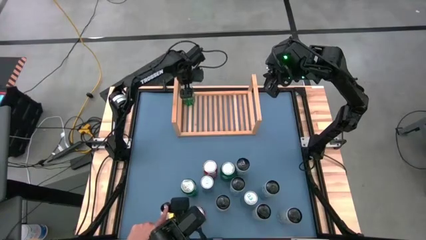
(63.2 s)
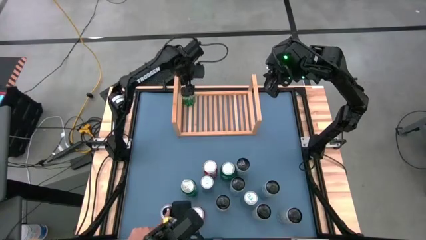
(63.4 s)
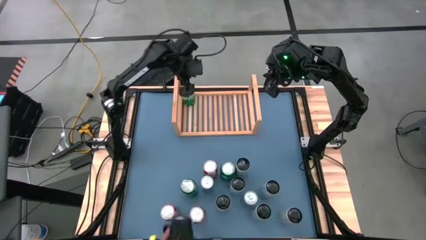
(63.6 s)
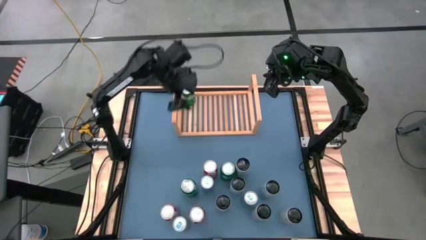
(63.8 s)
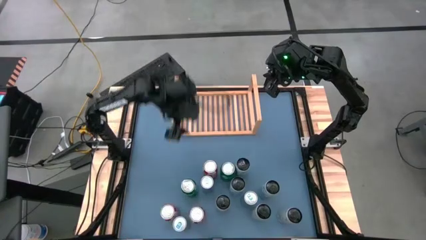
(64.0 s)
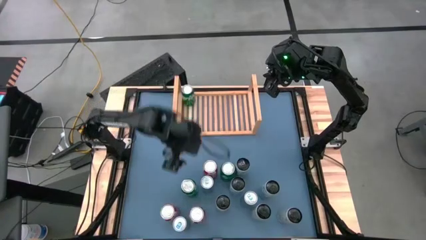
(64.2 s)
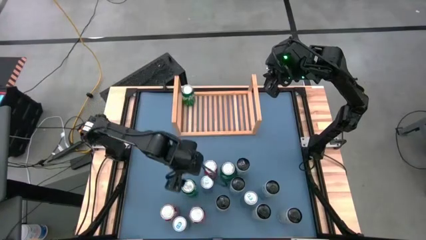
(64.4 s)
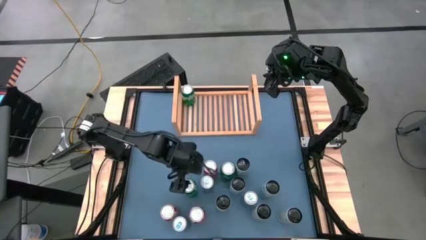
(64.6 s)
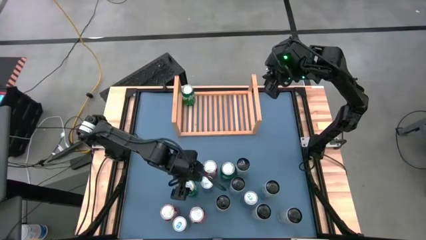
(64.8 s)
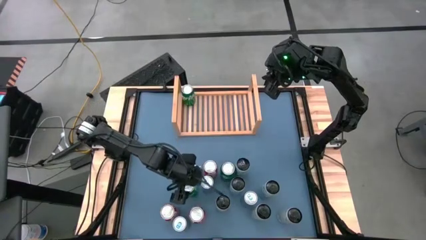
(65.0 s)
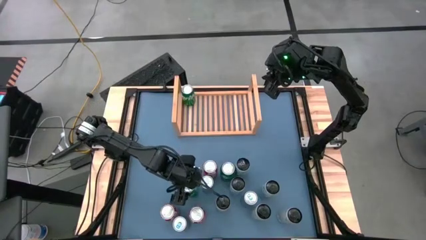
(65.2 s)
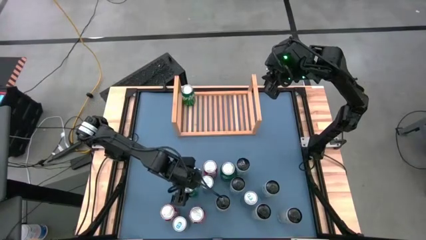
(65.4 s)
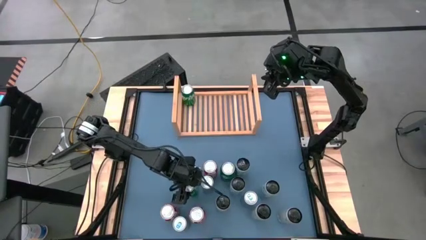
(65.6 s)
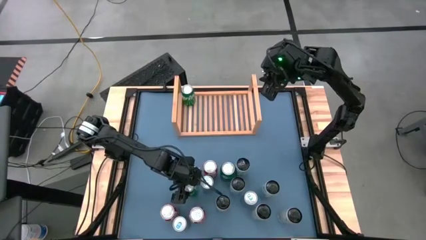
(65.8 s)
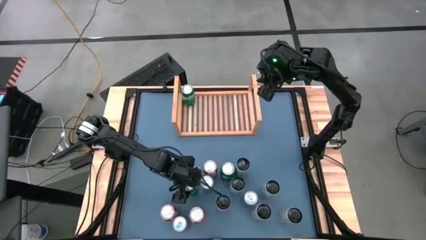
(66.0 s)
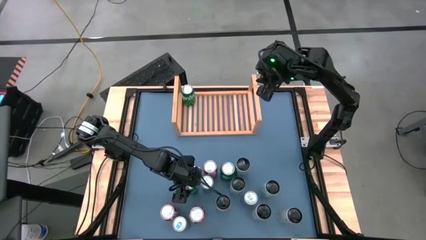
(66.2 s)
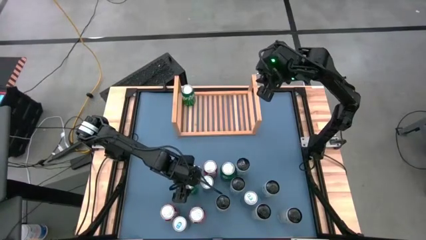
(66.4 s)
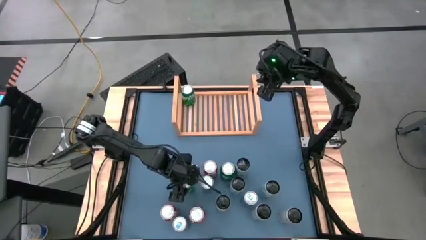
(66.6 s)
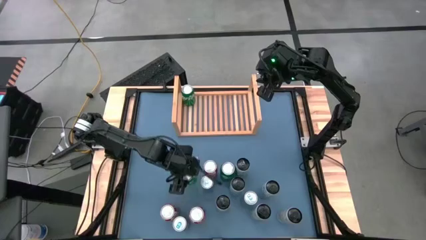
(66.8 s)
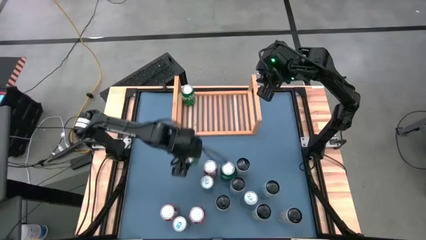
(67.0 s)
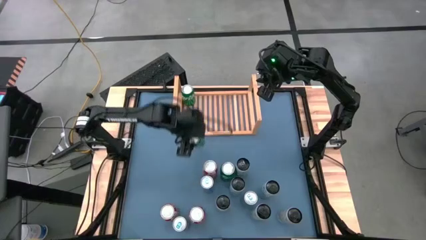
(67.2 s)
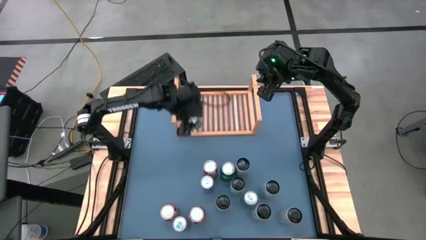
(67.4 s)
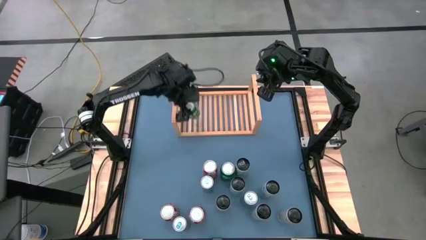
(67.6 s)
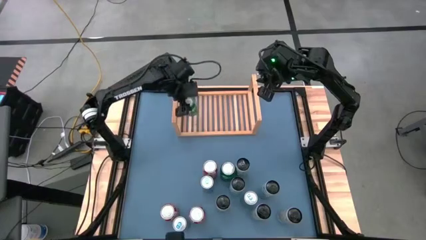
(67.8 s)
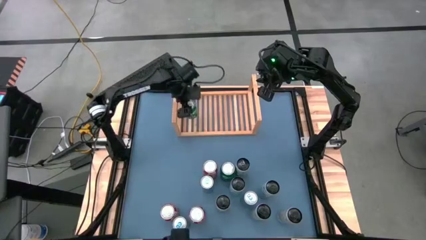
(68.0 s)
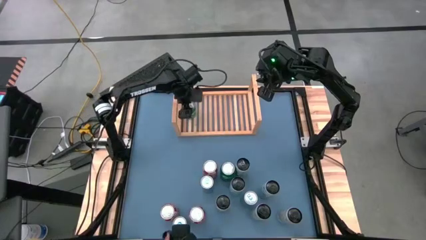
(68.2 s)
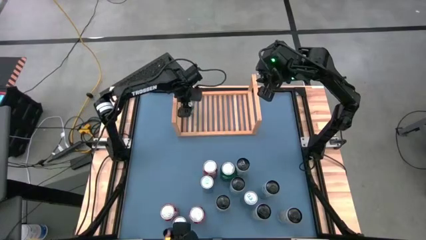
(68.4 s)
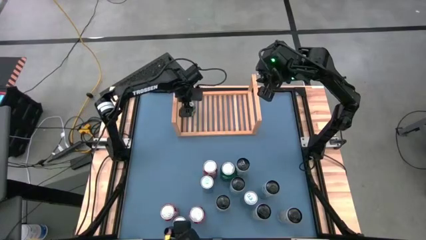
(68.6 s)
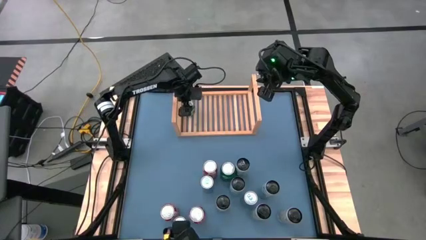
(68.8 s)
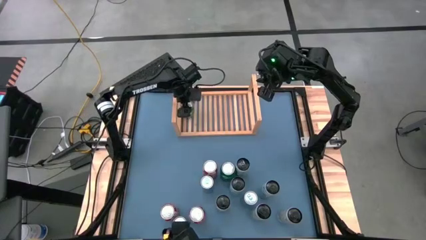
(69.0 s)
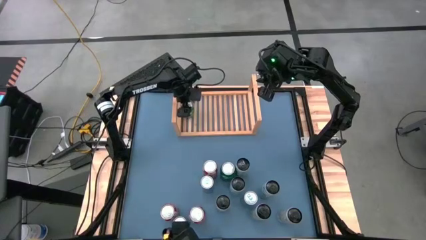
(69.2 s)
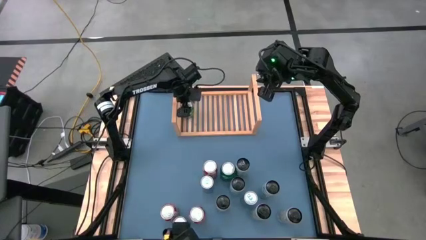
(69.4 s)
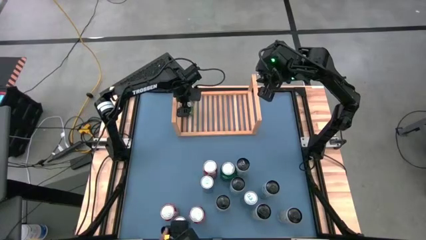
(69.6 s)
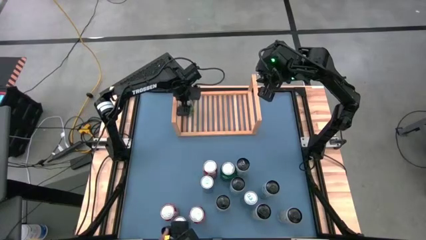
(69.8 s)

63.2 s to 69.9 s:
Task: Place canned beverage on shelf
Put the bottom left green soda can aligned with the green soda on the shelf

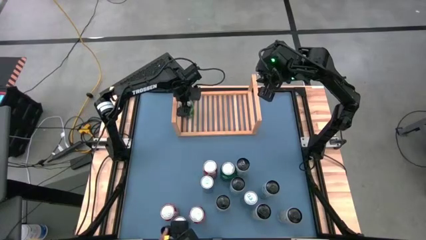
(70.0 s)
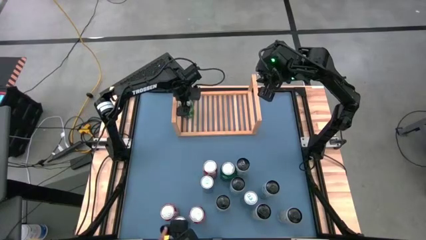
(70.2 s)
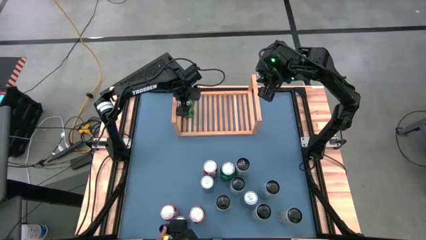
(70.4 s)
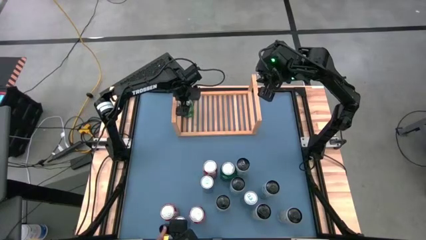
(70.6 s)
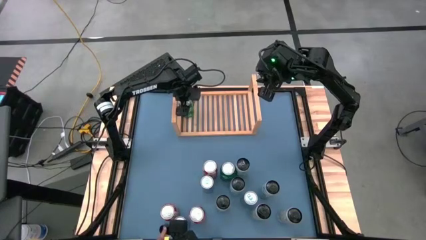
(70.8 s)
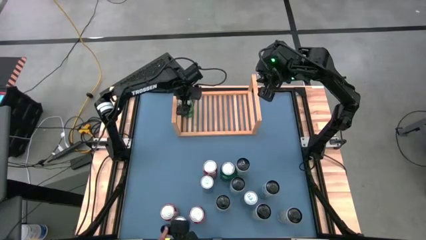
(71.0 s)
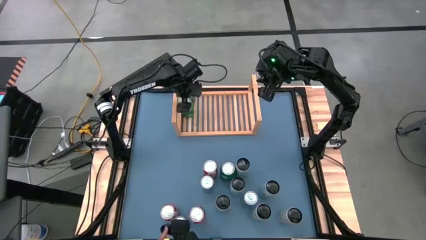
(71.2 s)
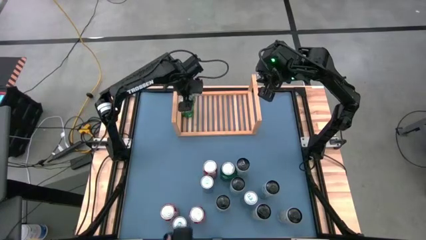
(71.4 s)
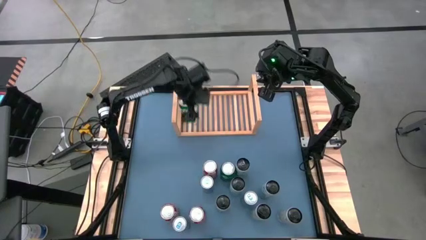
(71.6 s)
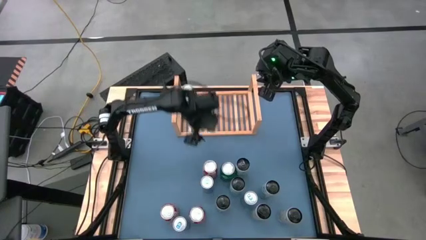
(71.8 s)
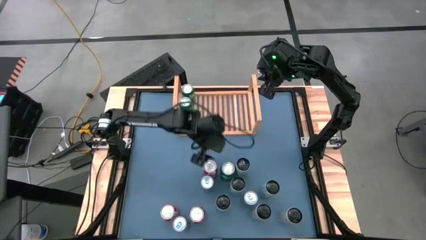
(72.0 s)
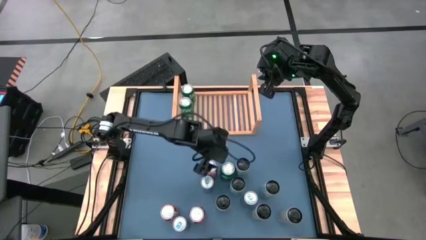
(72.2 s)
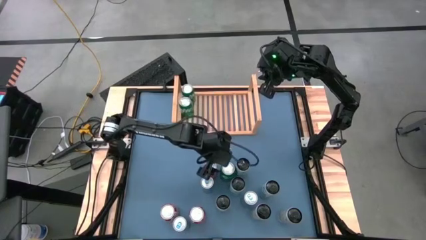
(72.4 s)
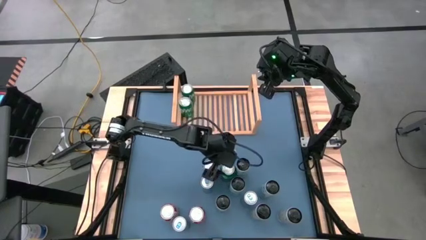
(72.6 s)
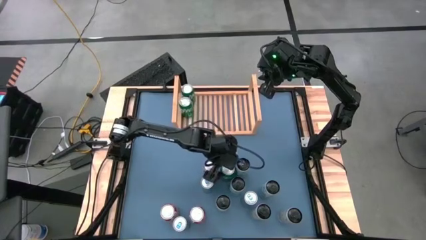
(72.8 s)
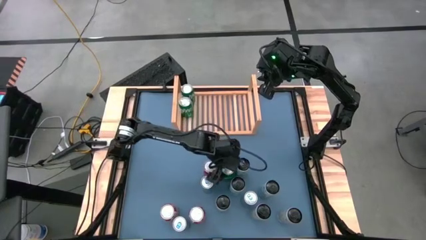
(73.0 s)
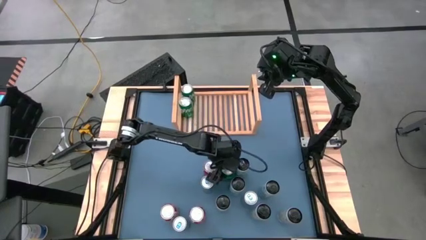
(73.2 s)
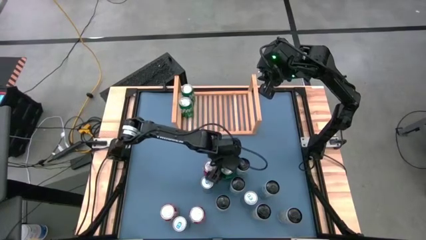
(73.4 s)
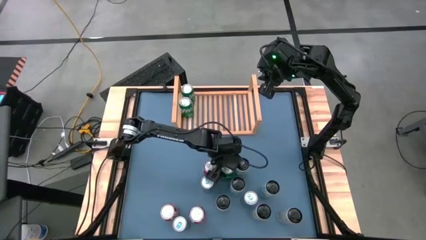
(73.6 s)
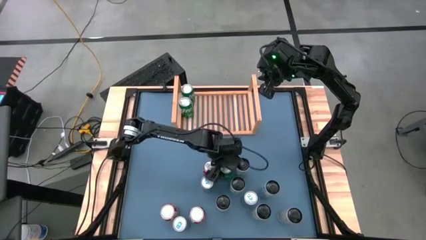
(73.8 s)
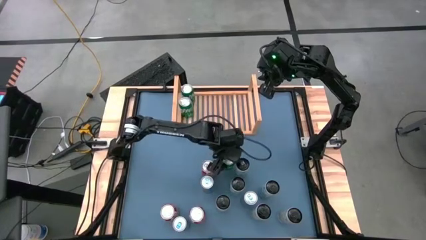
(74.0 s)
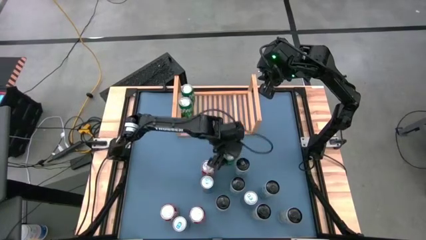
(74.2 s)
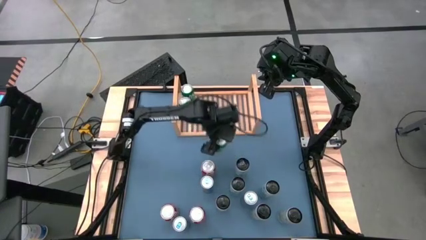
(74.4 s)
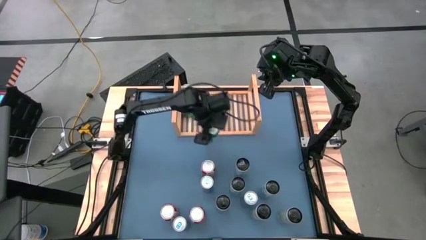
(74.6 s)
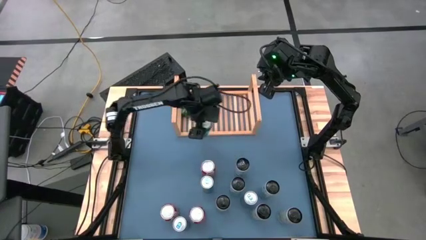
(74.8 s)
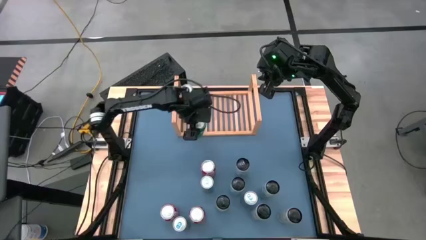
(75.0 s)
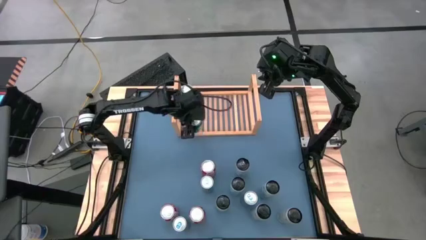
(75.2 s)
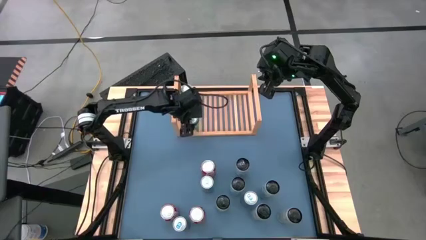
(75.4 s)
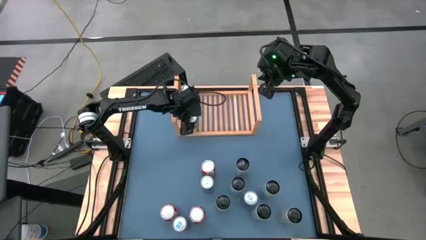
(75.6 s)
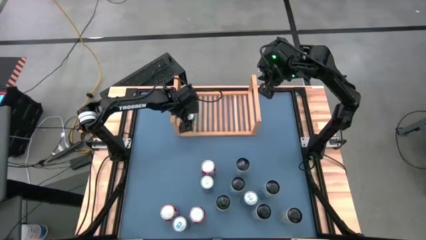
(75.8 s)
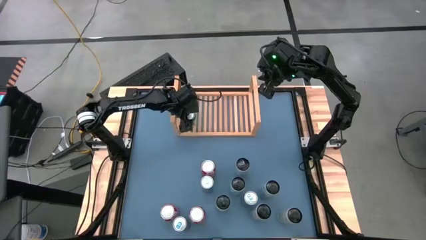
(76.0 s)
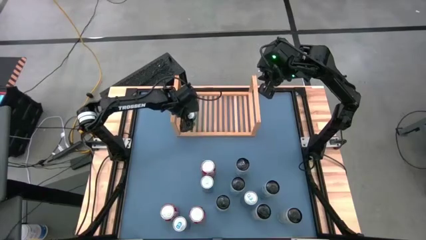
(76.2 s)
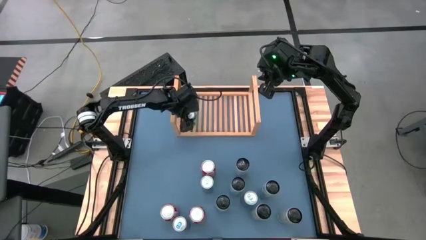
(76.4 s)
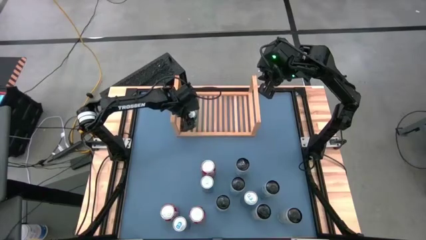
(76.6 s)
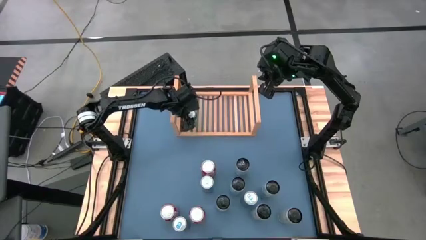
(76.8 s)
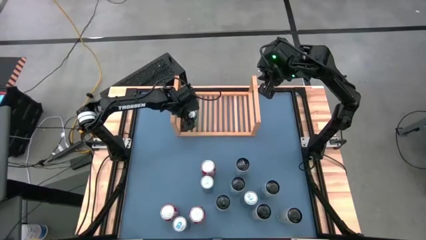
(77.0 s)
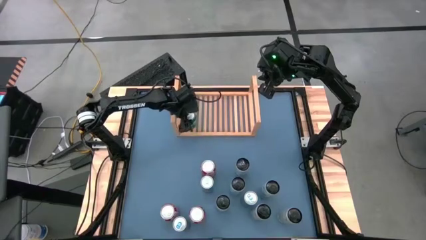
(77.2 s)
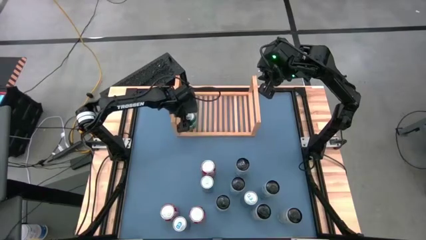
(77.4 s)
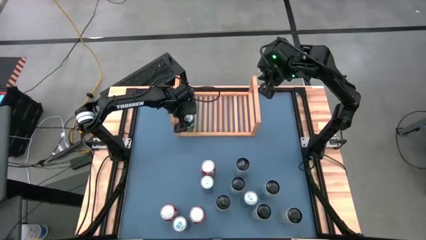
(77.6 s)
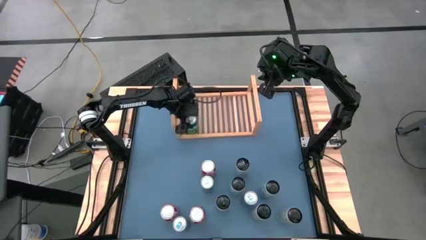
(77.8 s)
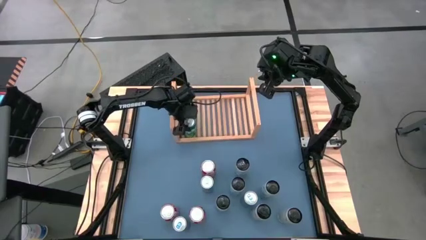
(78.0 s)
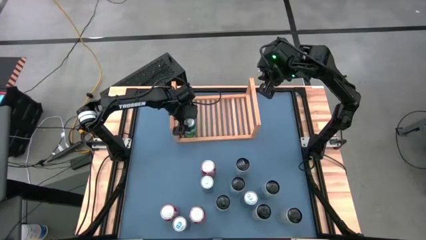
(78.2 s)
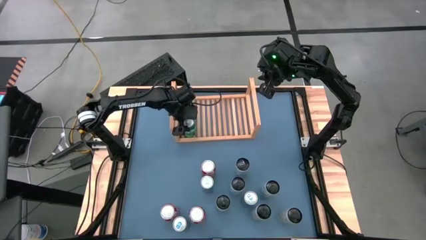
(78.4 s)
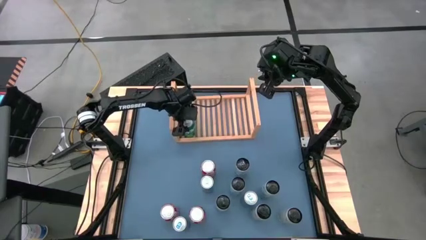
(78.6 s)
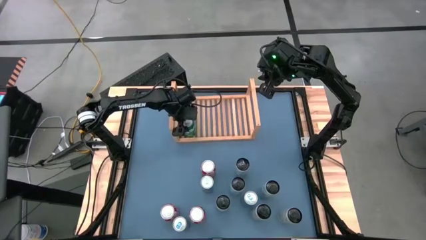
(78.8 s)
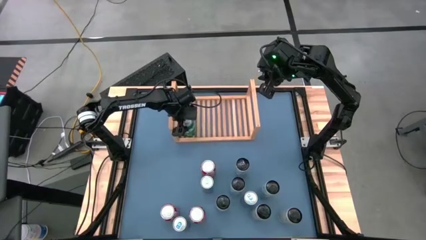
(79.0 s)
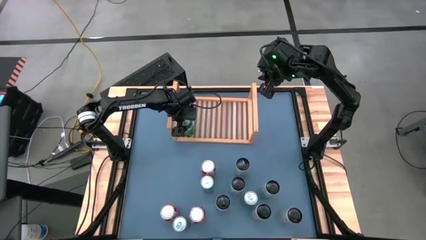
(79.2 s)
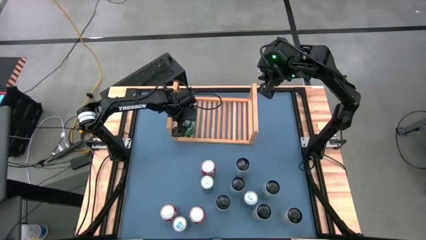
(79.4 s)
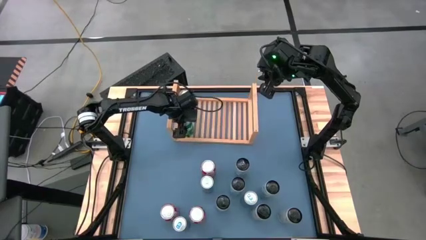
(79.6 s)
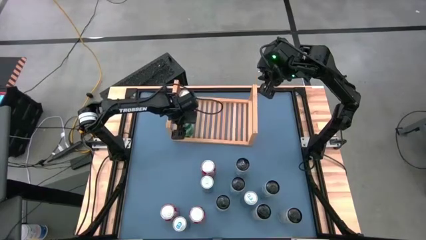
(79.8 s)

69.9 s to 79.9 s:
Put the middle green soda can aligned with the green soda on the shelf
